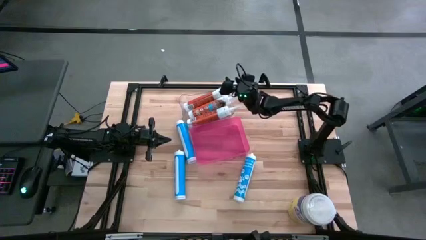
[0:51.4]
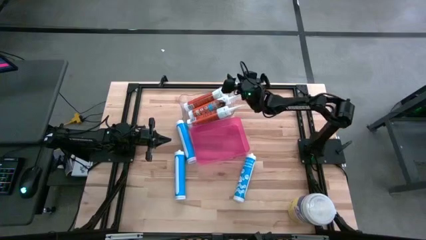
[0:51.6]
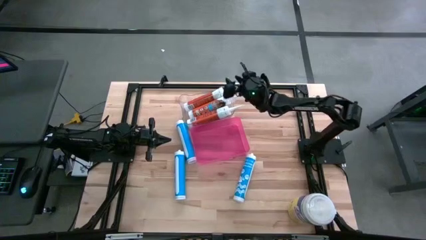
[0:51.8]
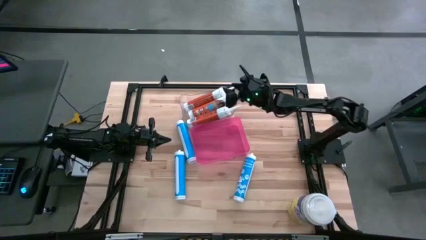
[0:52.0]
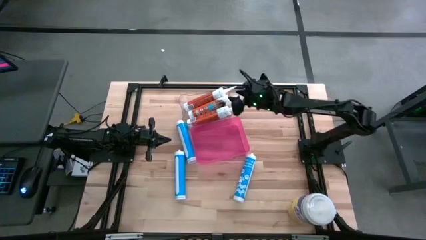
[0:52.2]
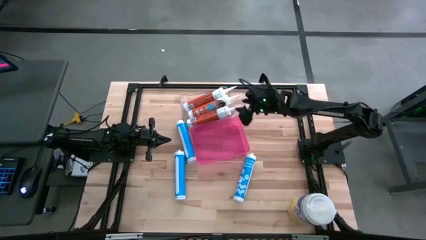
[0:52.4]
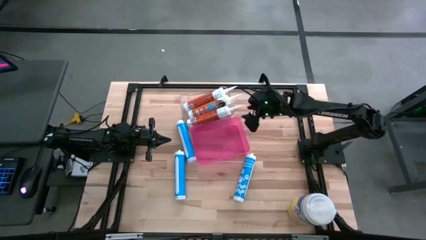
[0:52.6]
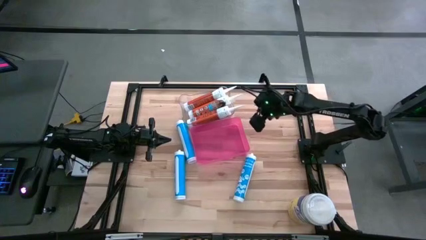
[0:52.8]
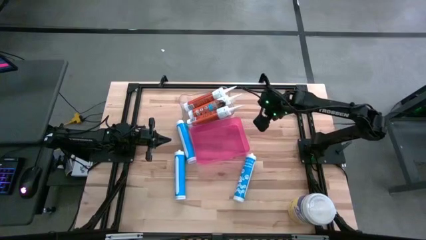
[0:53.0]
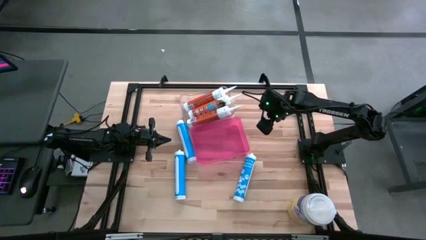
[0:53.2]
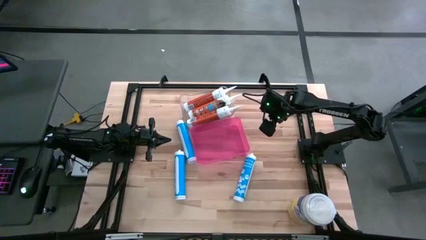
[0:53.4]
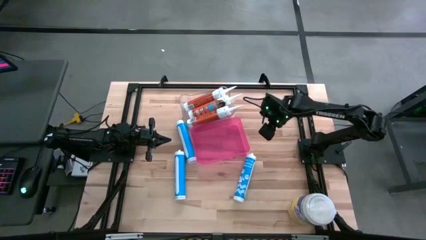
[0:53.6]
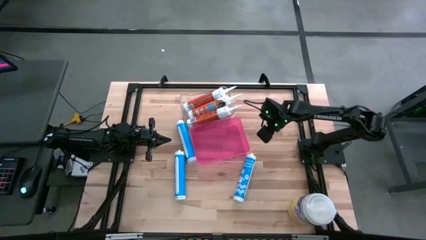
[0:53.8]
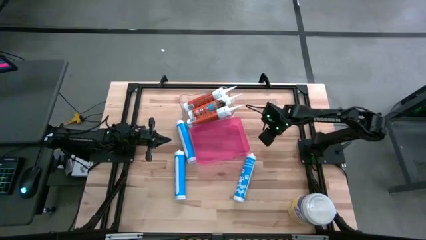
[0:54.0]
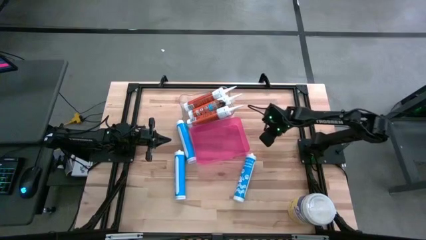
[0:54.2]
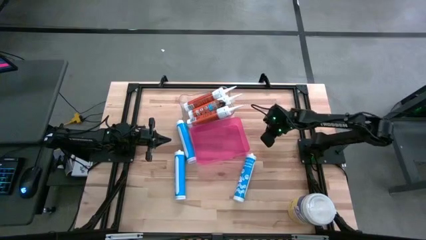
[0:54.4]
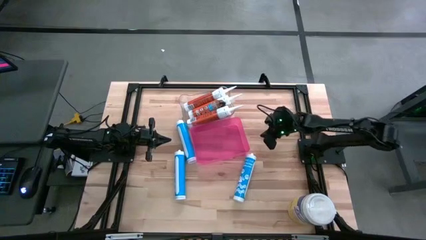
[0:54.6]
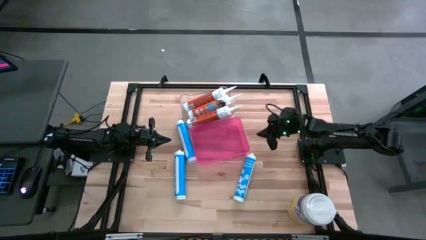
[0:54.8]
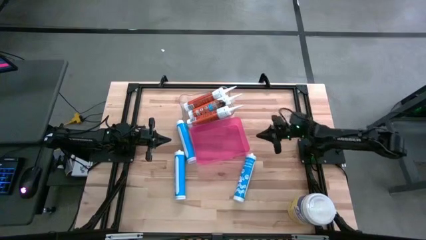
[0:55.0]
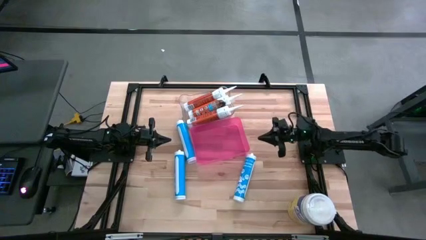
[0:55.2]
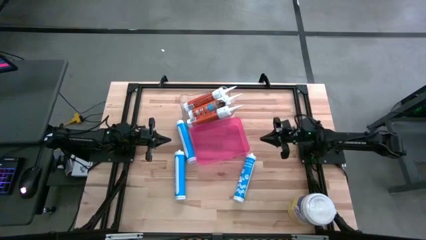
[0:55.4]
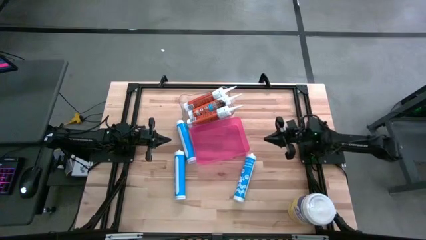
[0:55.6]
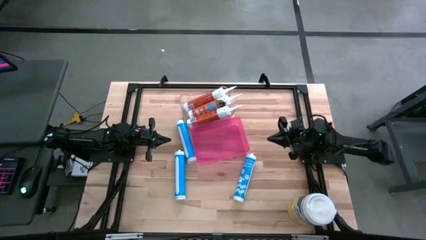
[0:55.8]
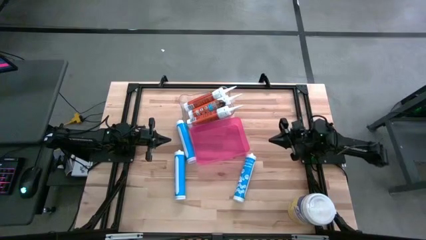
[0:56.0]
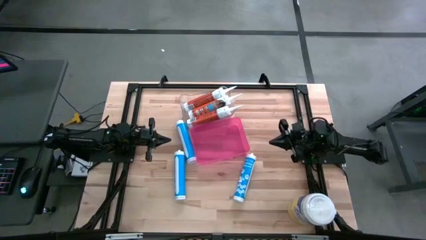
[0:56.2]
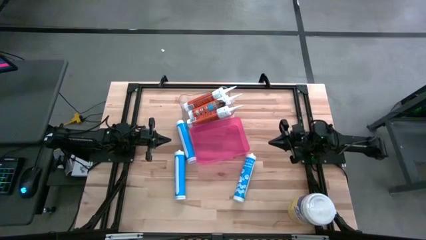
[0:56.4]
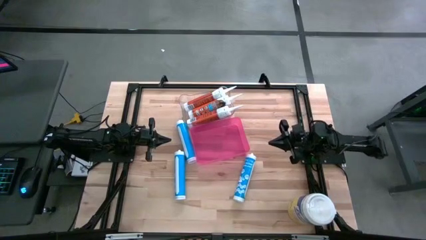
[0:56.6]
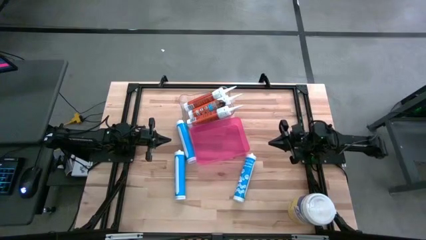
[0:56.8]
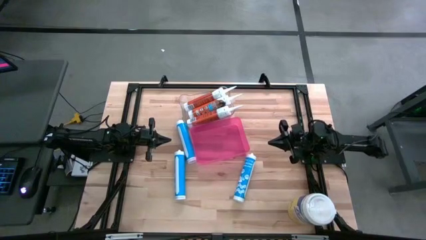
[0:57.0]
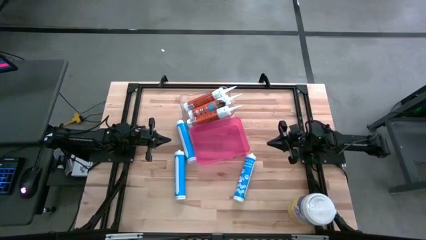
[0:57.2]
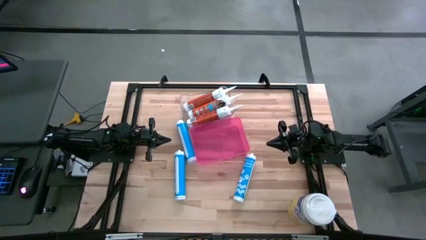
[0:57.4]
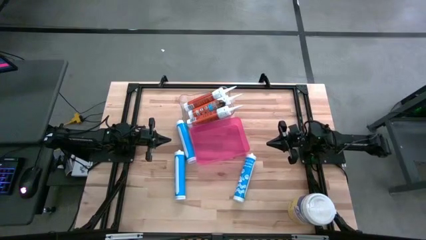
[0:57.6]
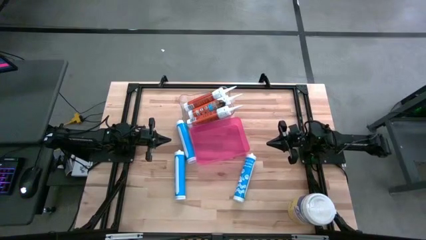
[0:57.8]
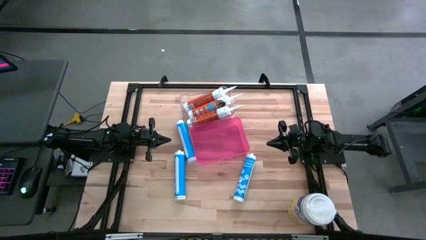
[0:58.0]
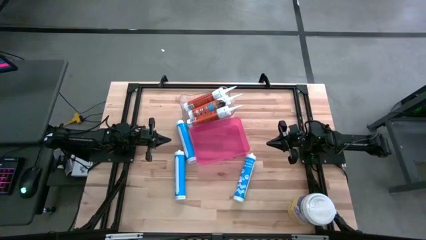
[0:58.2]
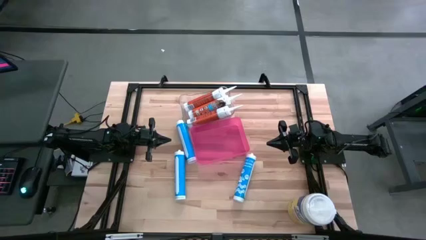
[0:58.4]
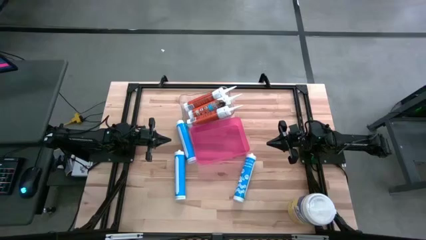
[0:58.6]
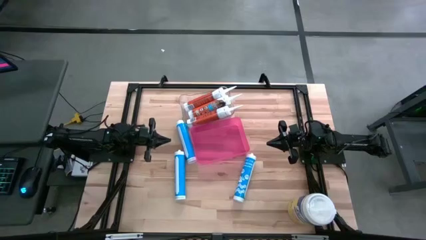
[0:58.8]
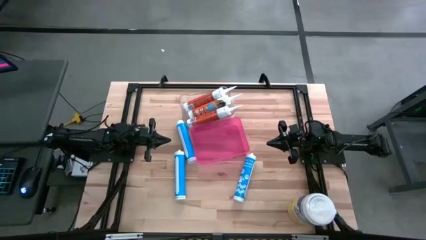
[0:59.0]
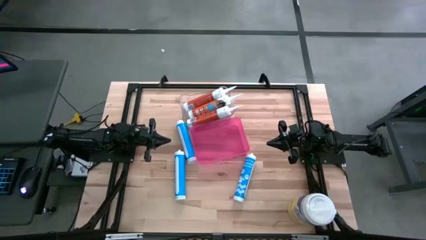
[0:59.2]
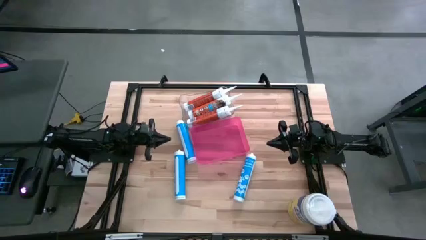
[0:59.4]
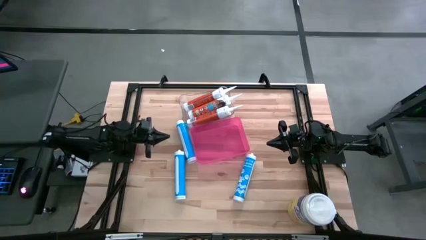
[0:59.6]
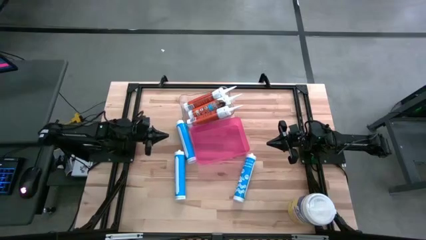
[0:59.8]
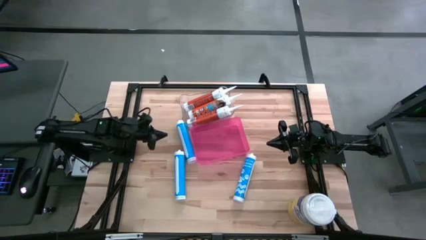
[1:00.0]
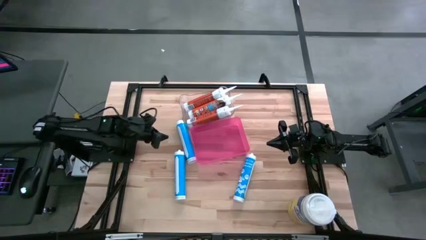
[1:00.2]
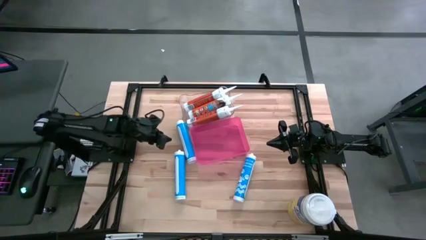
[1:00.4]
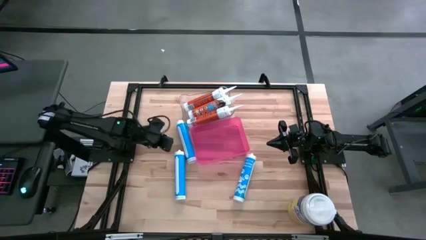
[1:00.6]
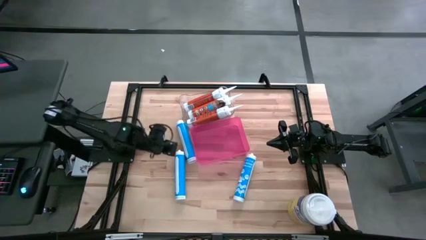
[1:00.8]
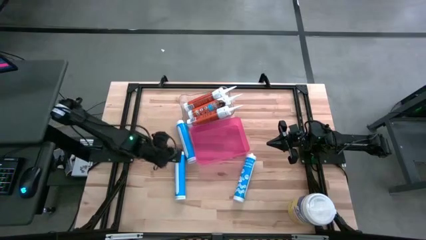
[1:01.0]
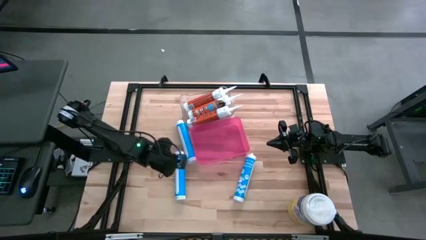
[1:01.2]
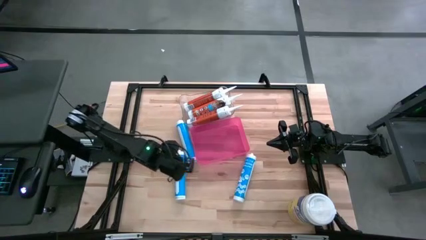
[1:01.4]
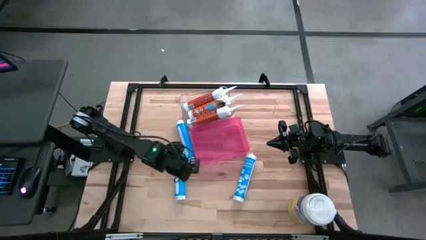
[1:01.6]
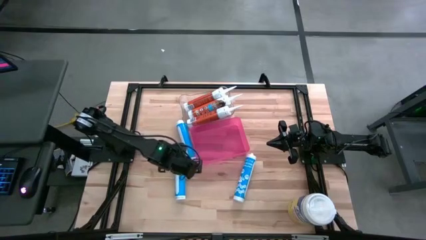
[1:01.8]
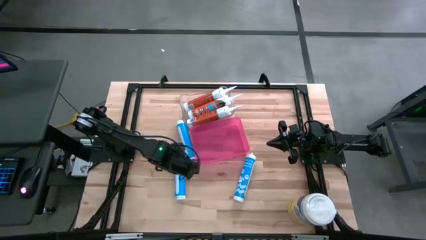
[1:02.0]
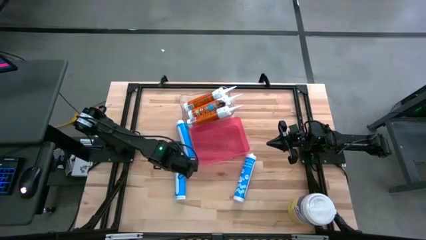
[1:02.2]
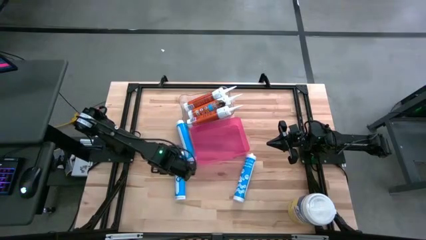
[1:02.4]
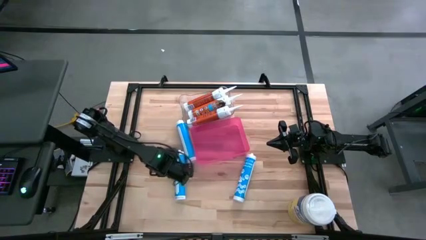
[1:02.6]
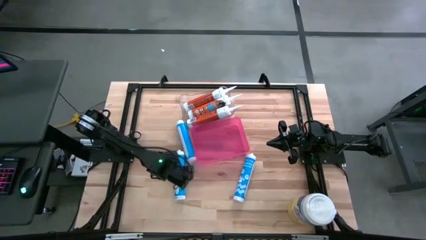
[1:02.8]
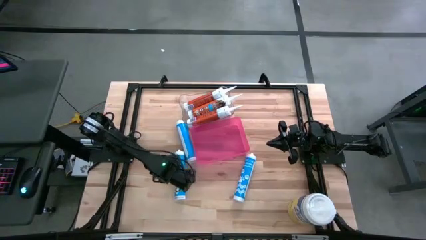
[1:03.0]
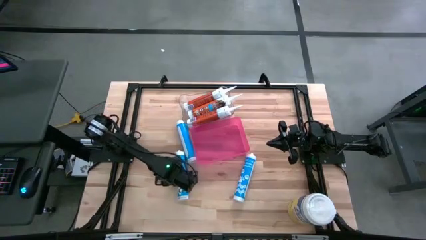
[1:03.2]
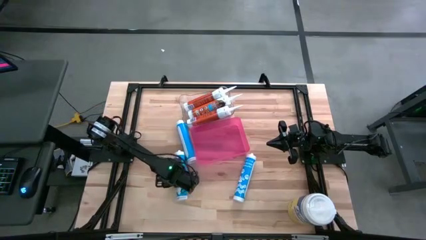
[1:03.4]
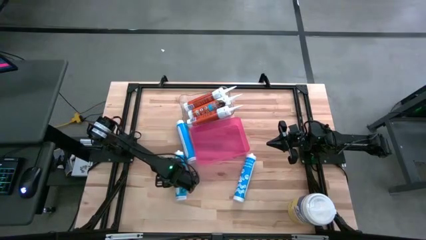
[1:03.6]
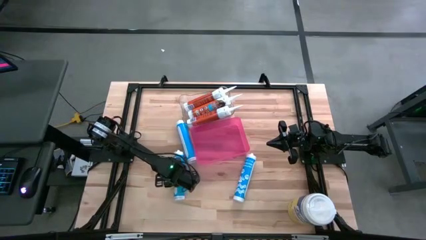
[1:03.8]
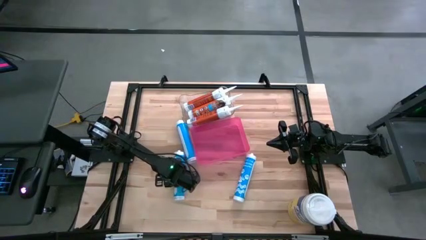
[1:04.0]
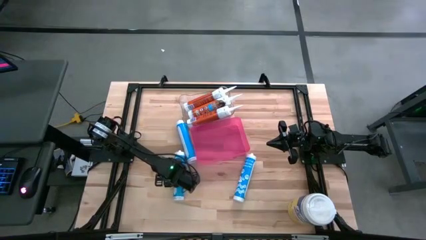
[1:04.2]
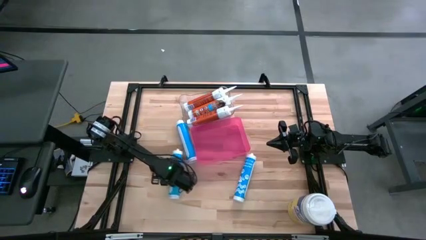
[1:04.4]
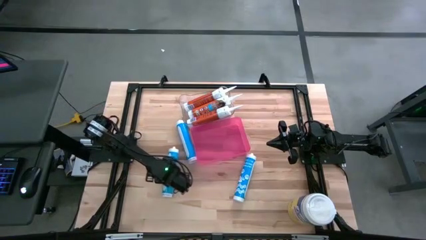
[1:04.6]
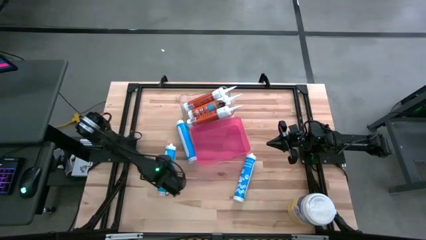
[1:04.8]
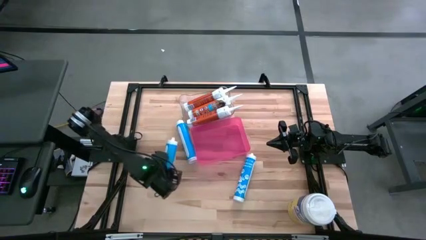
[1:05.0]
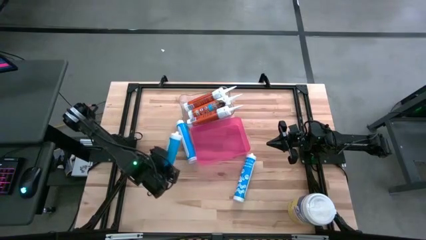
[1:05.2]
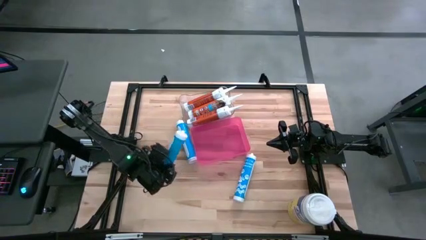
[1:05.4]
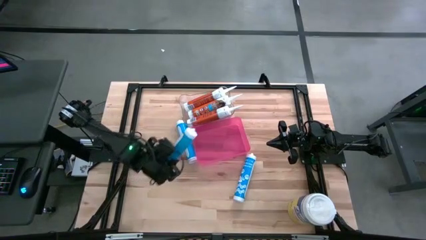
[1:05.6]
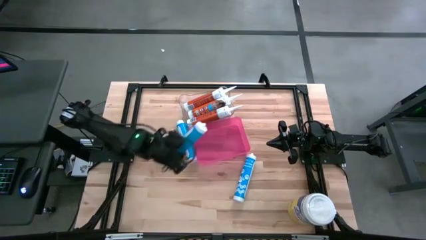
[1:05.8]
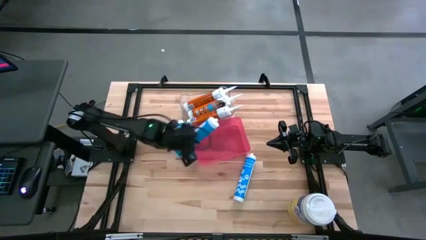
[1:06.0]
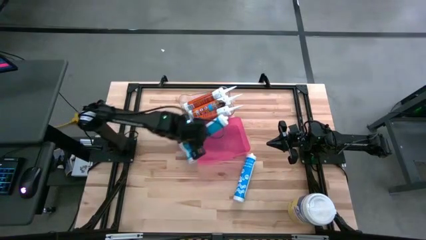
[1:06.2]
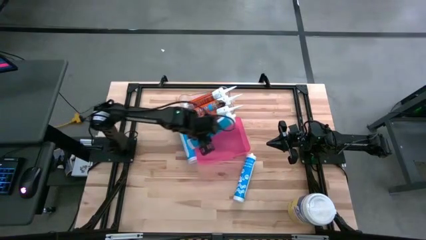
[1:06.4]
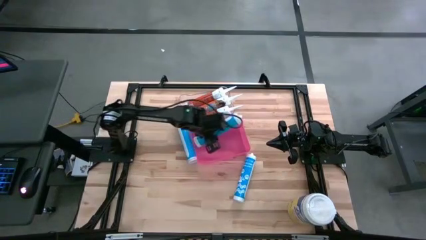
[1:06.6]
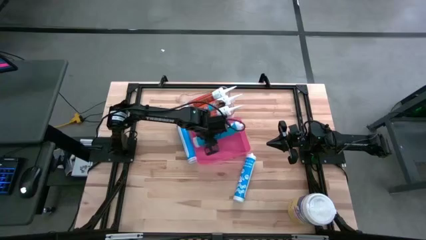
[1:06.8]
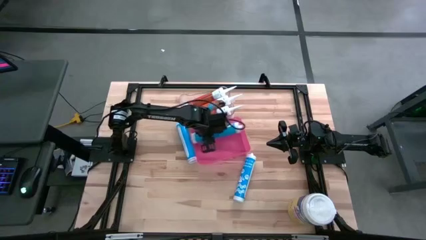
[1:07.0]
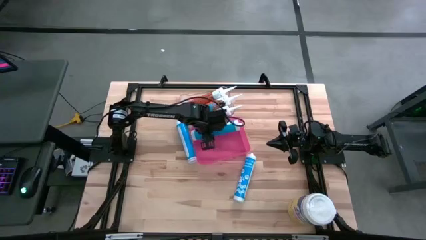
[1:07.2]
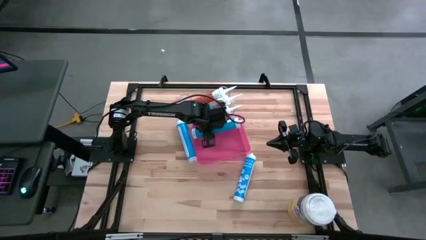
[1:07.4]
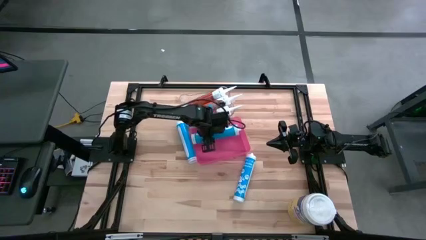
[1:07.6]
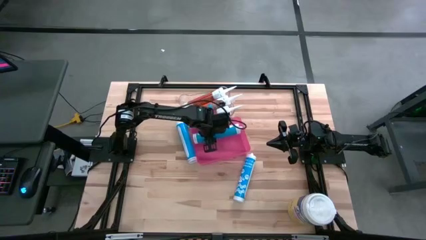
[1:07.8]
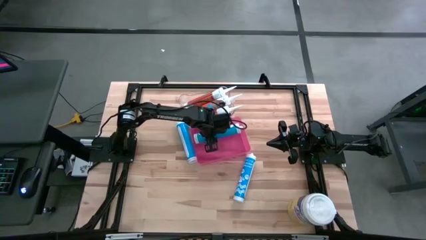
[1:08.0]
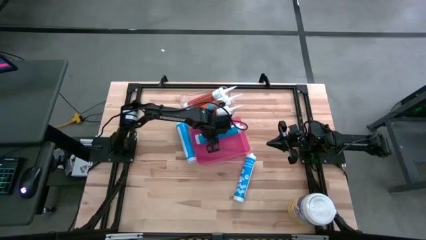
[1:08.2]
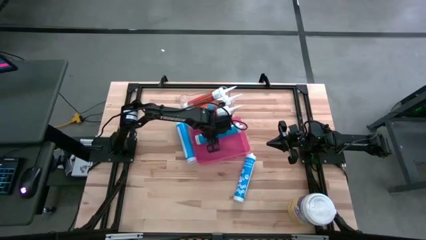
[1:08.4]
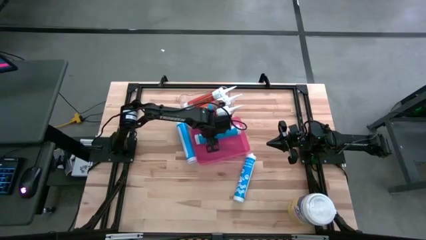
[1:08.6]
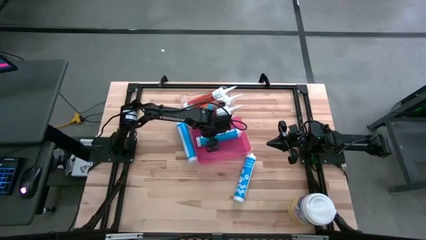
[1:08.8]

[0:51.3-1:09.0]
Task: Pick & place silicon tubes, Sealant and Lysol wipes
Put the bottom left blue sealant into the pink bin
